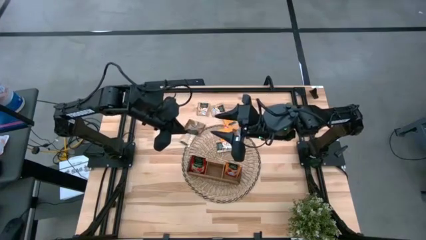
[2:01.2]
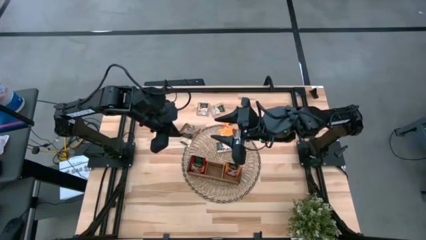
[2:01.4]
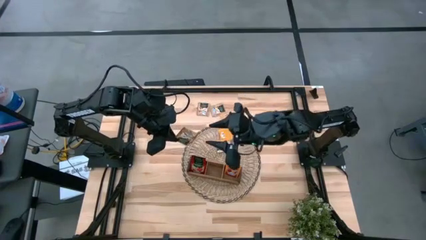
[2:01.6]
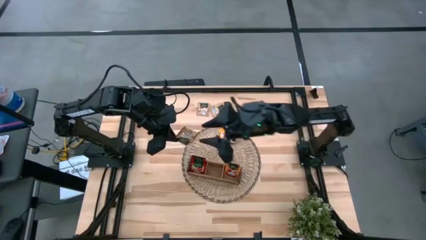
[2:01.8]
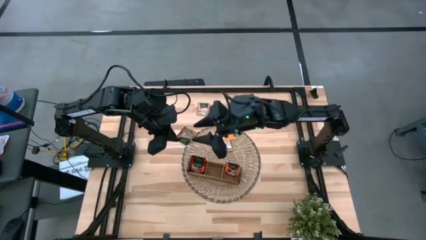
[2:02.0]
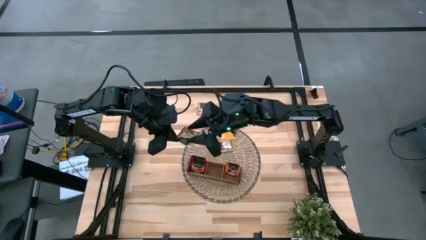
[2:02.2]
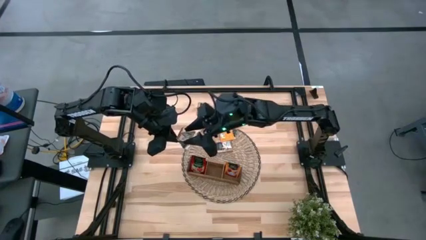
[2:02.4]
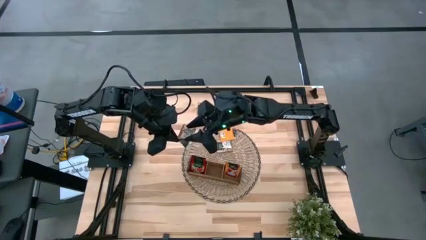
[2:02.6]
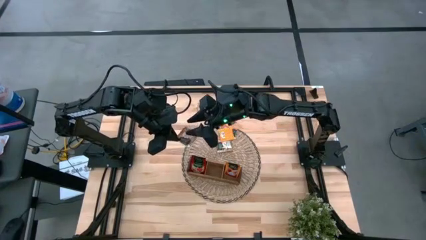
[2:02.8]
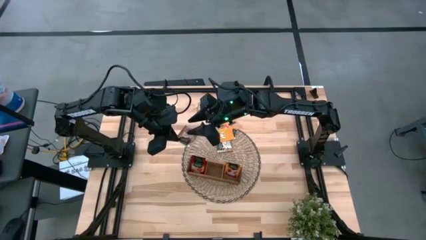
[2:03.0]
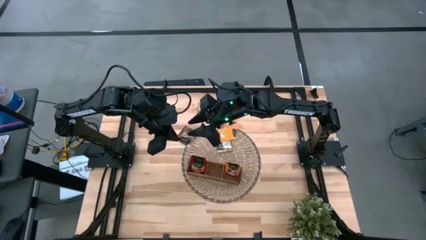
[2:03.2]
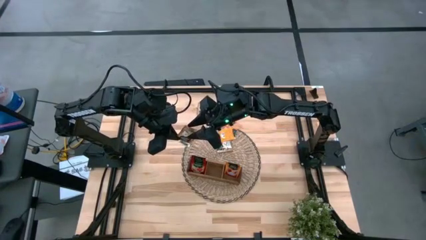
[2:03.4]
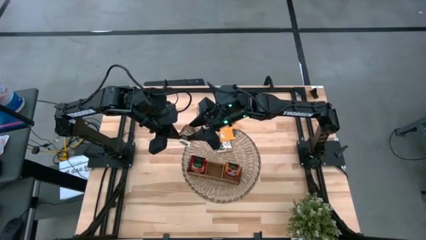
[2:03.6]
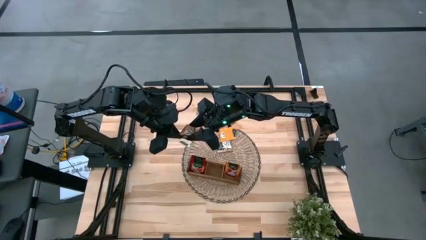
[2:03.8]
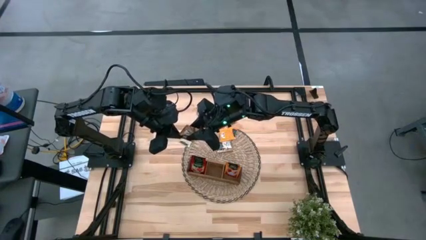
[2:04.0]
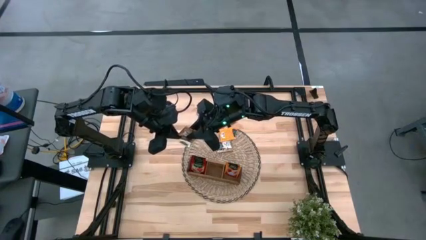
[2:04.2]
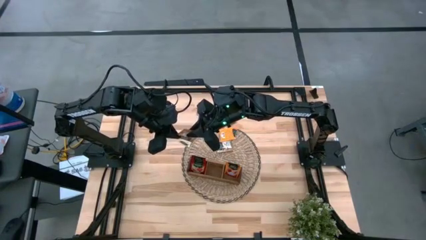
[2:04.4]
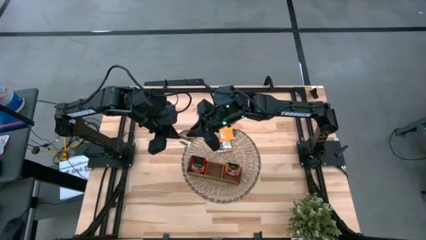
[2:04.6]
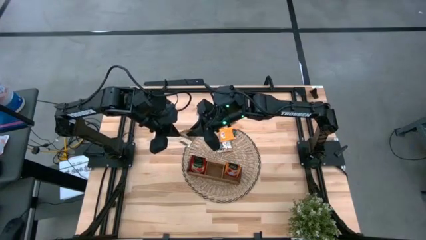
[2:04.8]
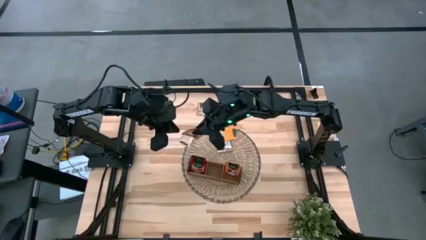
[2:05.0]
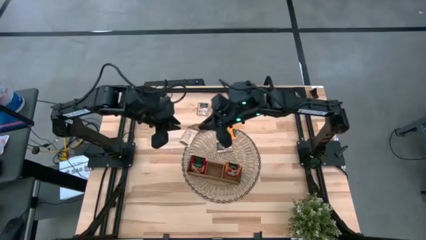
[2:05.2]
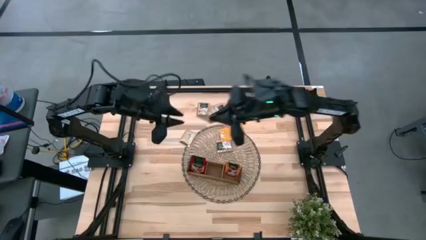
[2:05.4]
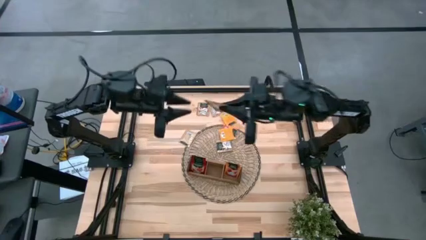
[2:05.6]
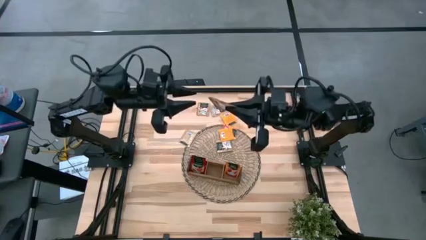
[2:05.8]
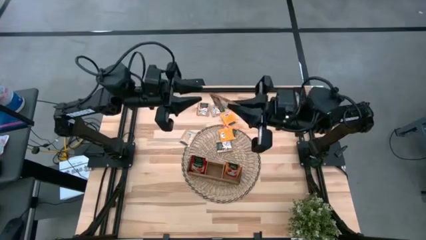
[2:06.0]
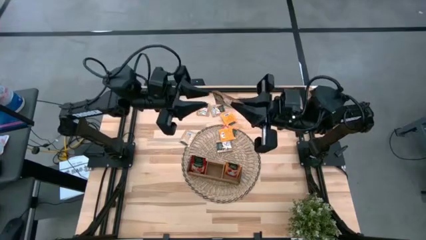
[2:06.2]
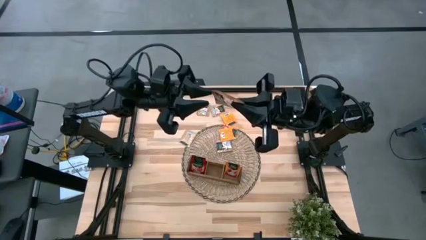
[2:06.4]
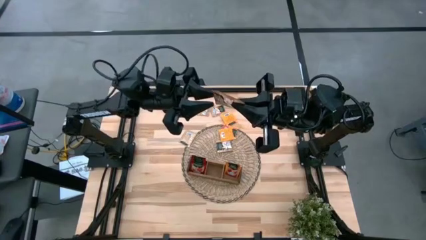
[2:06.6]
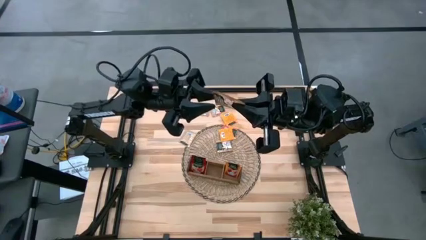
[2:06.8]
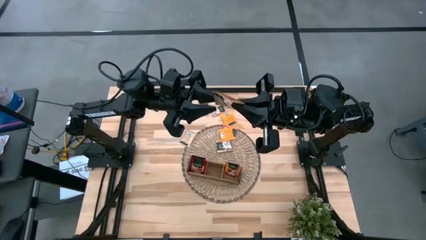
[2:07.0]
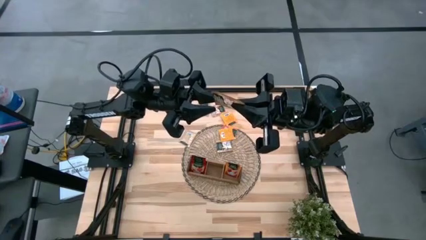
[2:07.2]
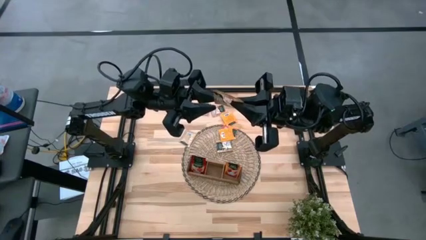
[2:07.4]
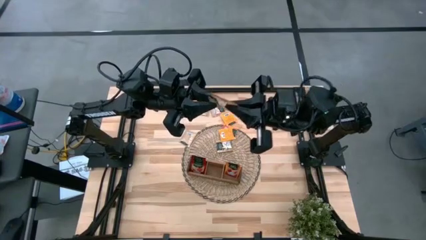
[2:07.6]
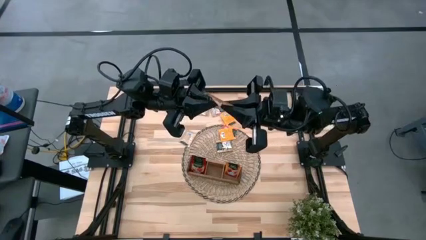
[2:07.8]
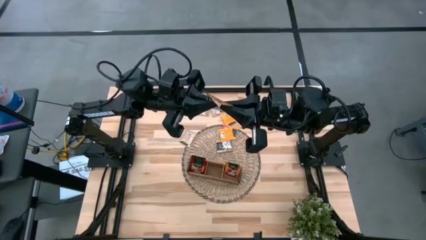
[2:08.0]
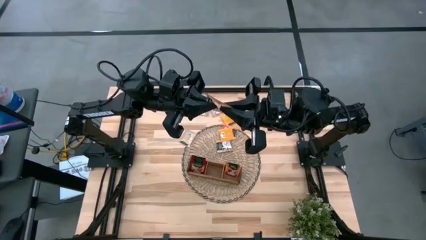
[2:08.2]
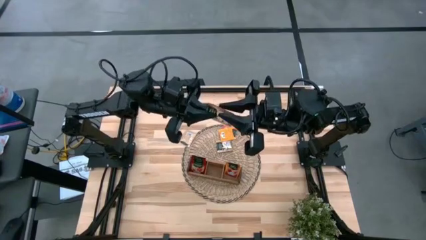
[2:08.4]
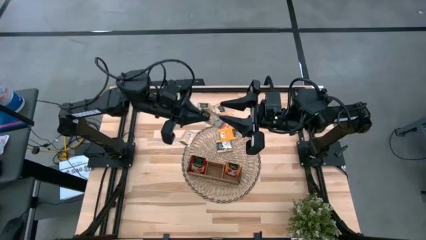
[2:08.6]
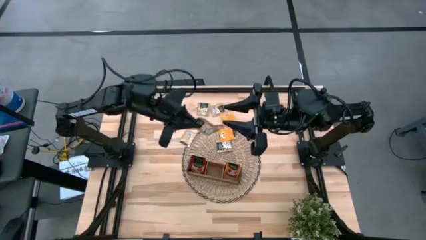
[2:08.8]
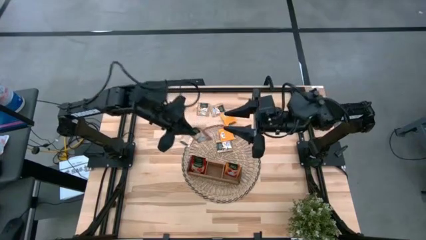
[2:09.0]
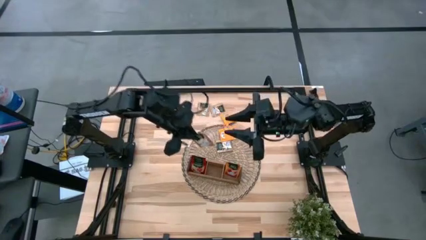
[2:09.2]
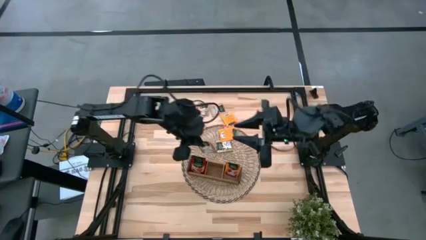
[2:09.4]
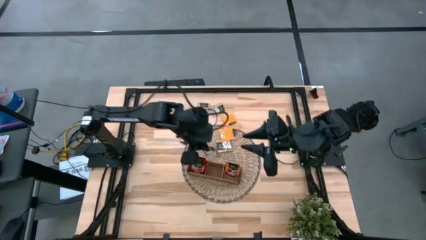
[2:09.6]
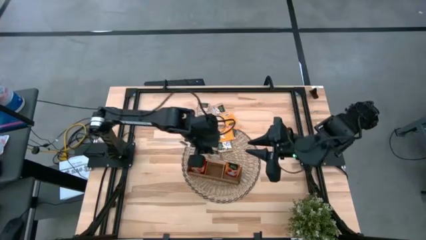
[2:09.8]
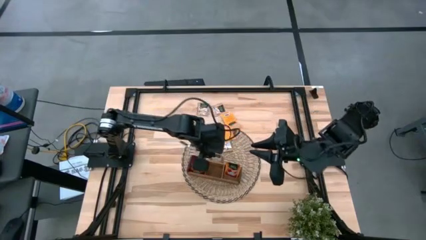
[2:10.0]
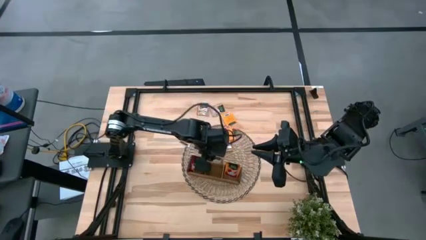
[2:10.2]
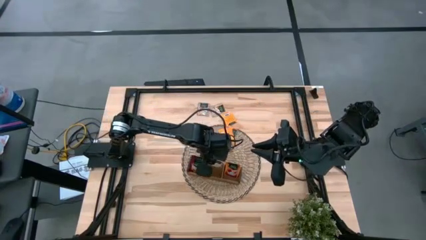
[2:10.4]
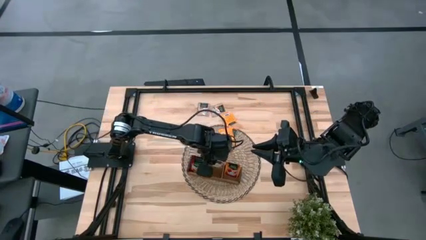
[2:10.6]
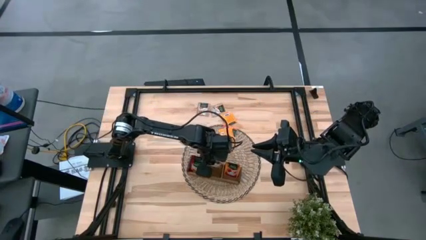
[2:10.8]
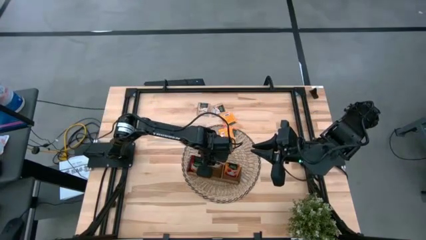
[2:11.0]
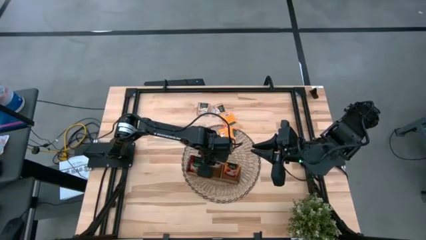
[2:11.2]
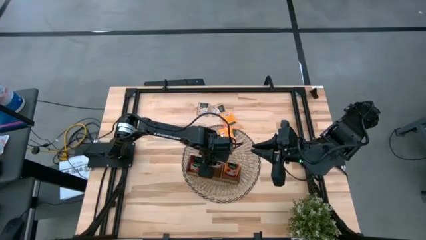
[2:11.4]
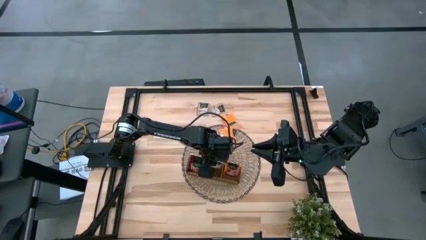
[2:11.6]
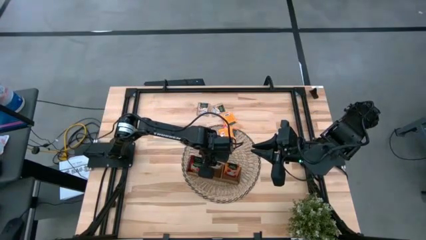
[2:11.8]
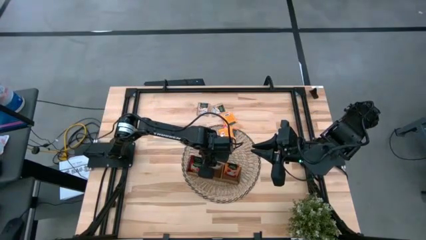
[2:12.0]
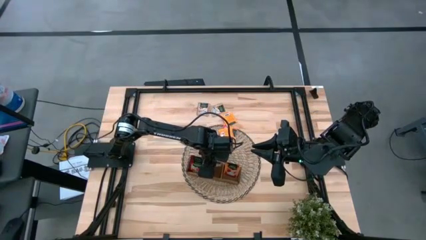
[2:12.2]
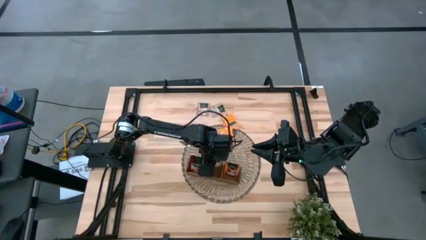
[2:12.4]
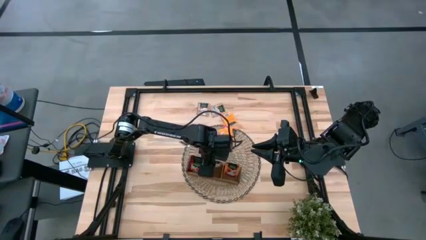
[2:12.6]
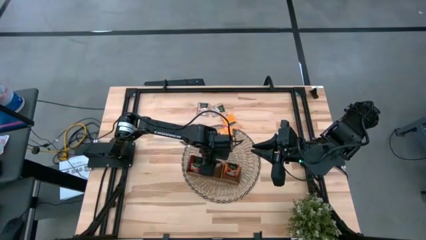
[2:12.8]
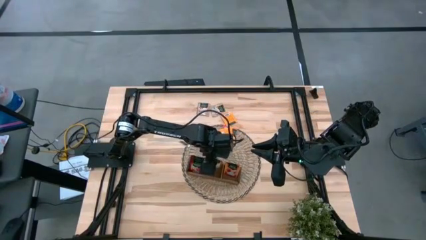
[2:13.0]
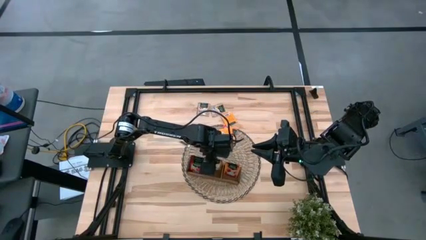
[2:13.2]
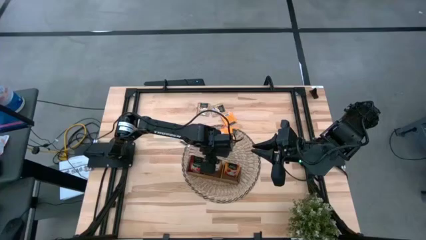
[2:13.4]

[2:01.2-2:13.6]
Task: Pick & Place Tea
Put the brown tea bag into the middle section of the wooden organizer

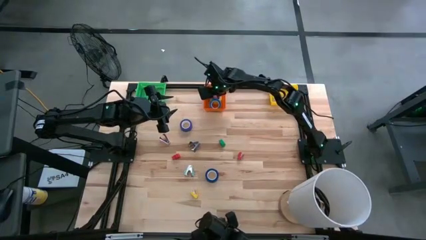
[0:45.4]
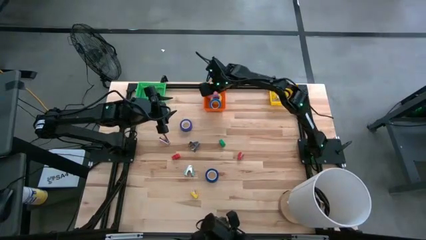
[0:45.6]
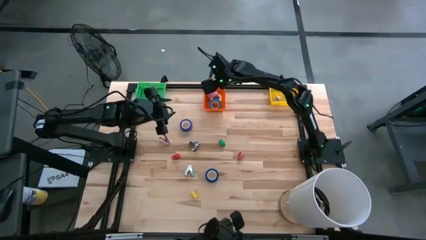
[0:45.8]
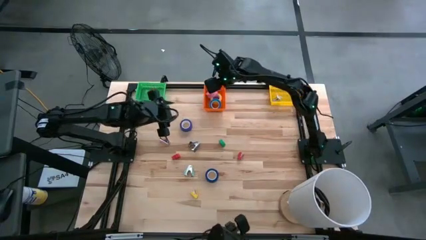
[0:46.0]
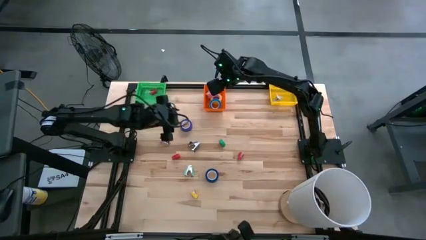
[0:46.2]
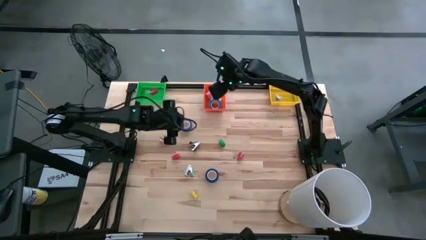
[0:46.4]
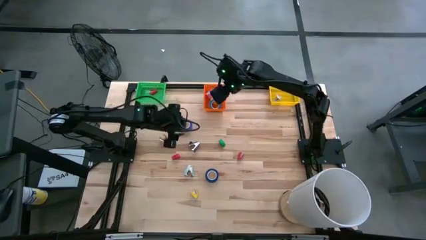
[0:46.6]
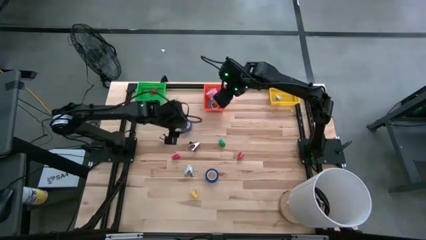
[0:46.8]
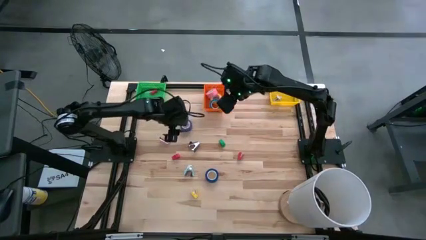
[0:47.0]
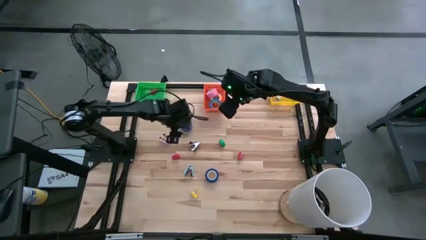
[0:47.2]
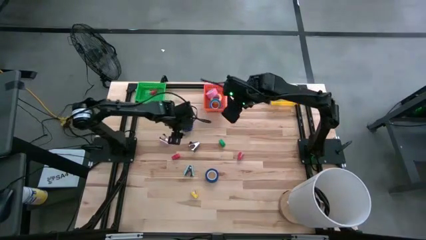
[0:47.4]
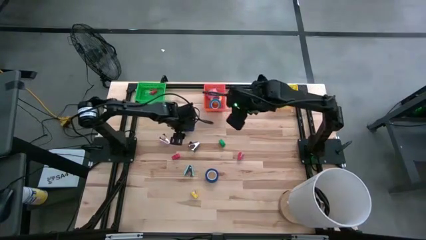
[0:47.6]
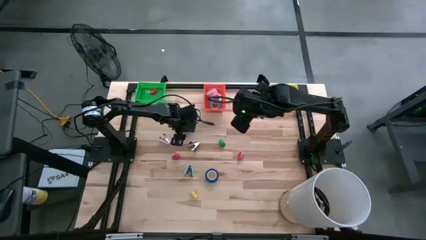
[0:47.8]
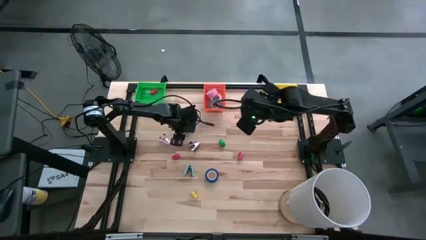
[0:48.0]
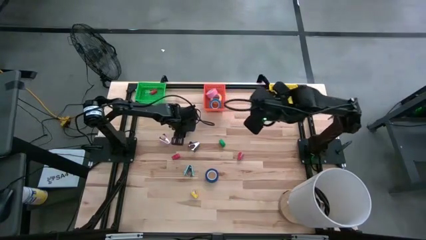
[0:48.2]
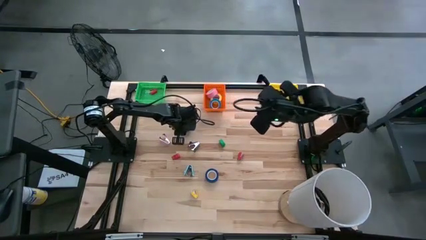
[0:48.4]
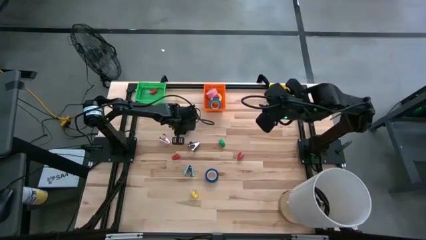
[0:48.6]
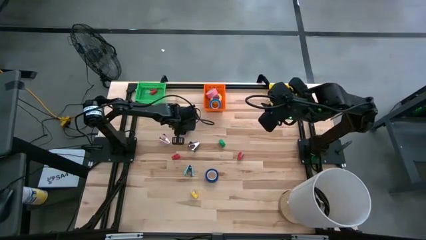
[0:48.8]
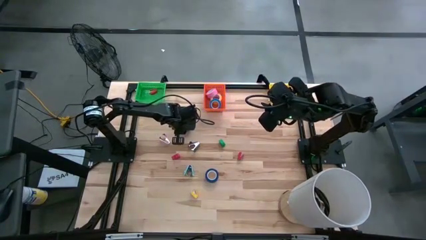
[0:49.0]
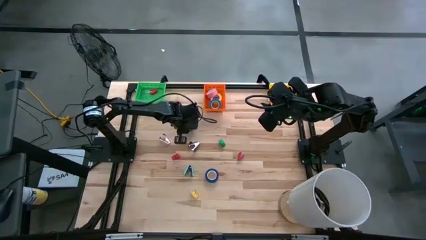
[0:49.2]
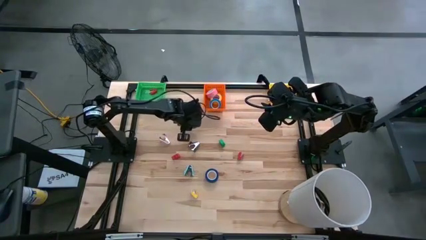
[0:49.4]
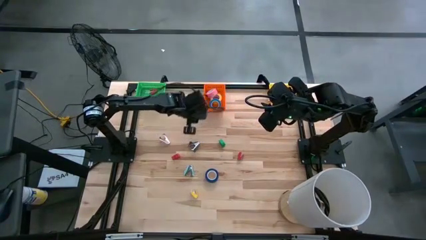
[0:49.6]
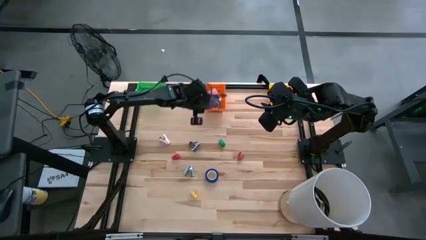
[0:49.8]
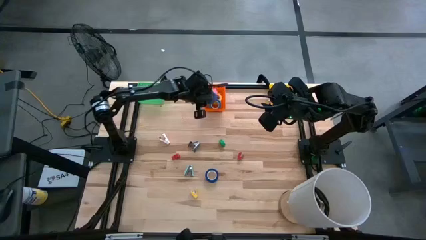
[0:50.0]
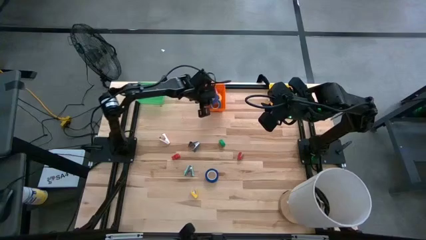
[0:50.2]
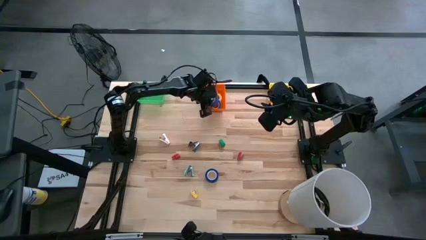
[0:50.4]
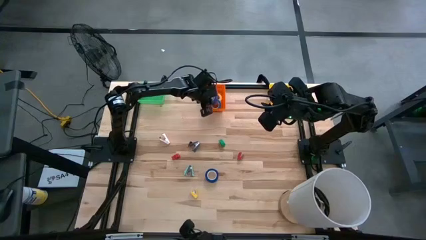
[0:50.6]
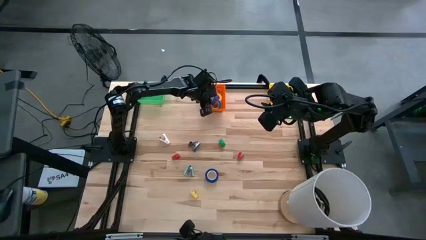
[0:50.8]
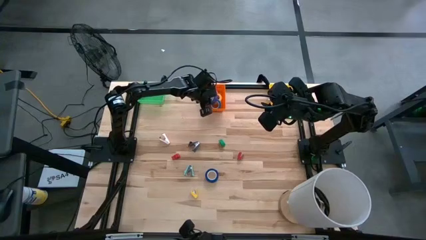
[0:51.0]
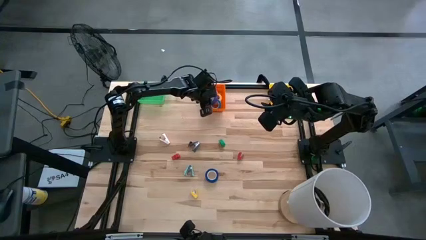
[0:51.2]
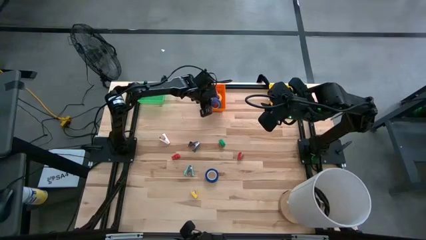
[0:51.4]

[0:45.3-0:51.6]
Task: Pick and place Stapler, Stapler remover, tape
Put the top blue tape into the orange bin
